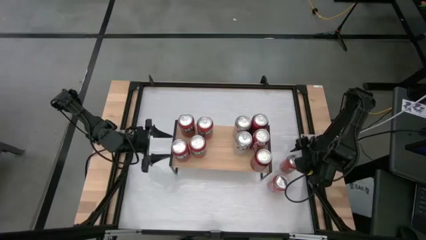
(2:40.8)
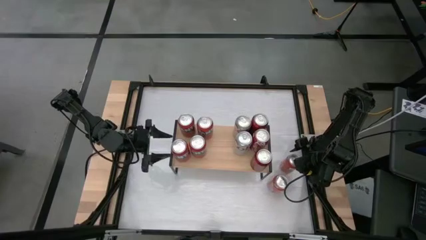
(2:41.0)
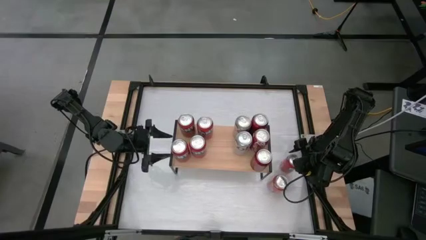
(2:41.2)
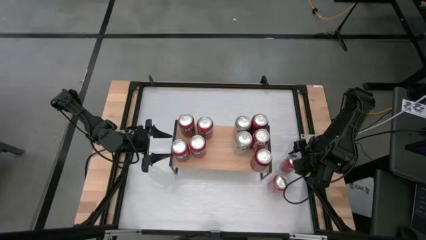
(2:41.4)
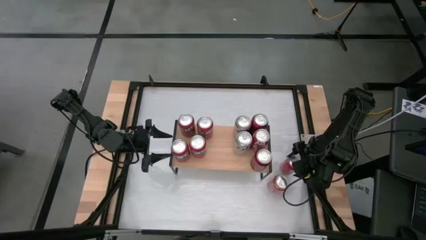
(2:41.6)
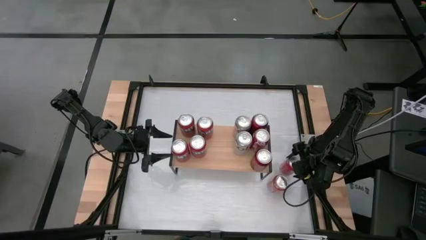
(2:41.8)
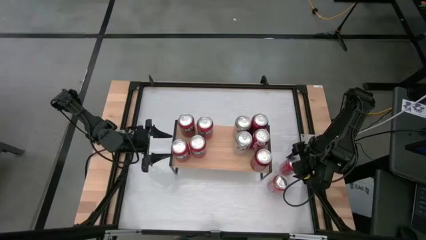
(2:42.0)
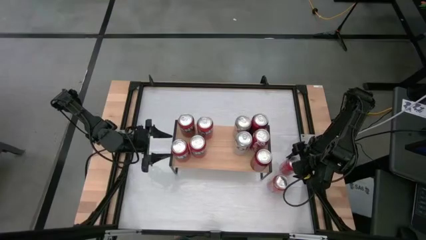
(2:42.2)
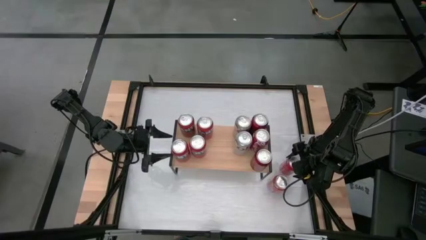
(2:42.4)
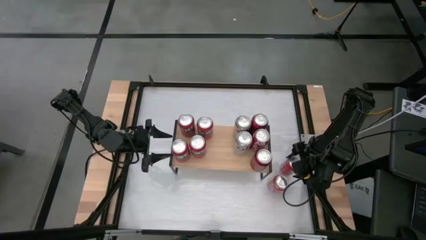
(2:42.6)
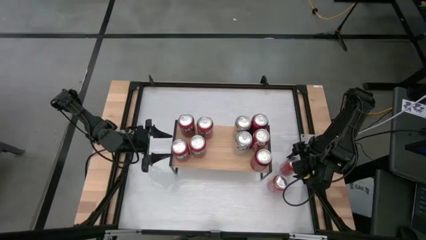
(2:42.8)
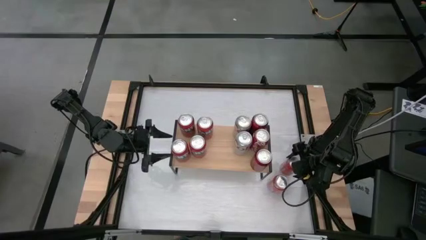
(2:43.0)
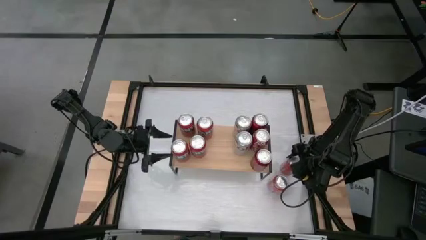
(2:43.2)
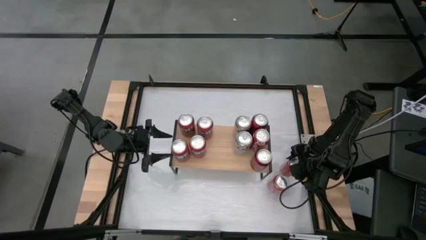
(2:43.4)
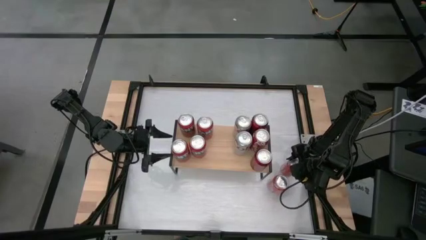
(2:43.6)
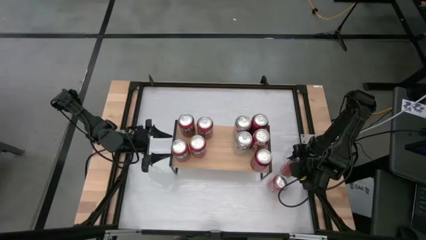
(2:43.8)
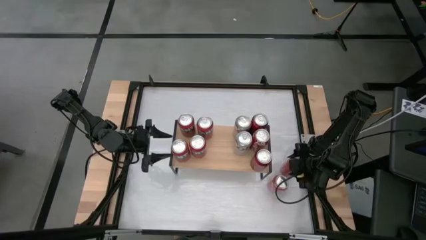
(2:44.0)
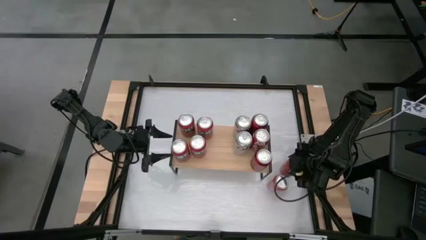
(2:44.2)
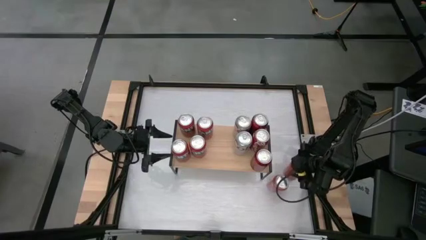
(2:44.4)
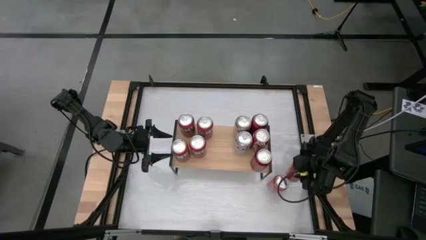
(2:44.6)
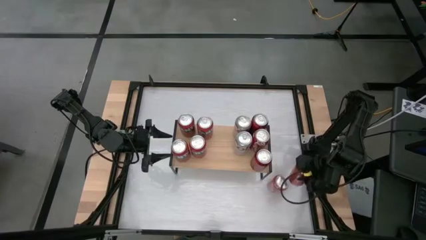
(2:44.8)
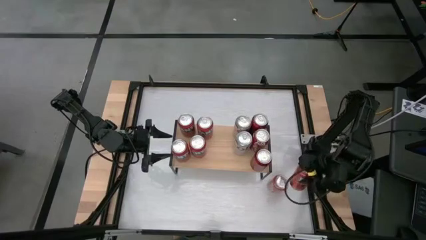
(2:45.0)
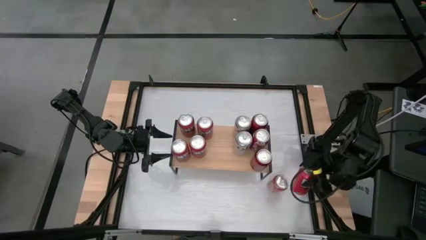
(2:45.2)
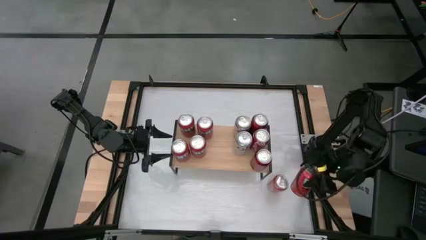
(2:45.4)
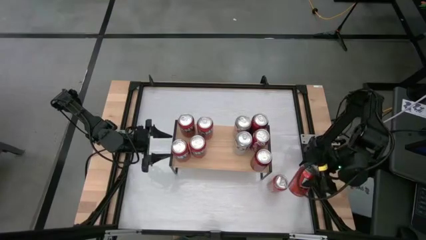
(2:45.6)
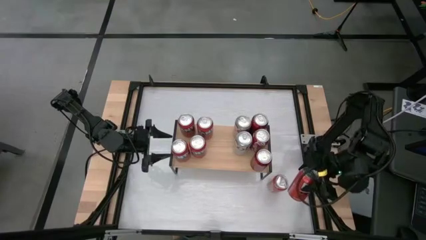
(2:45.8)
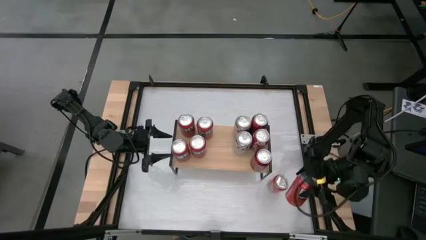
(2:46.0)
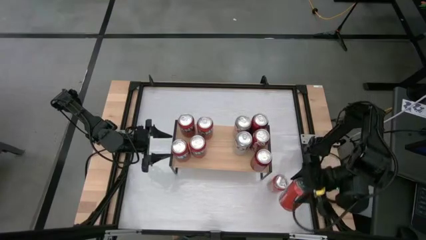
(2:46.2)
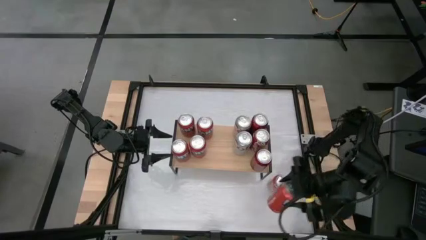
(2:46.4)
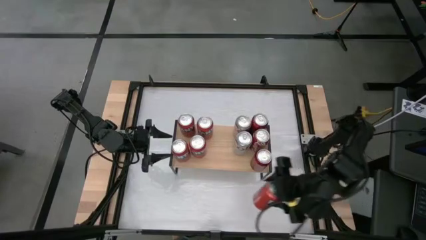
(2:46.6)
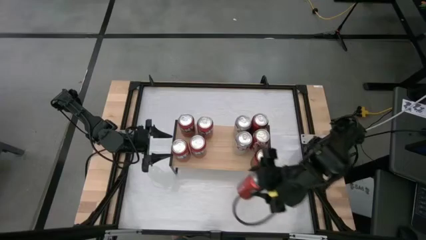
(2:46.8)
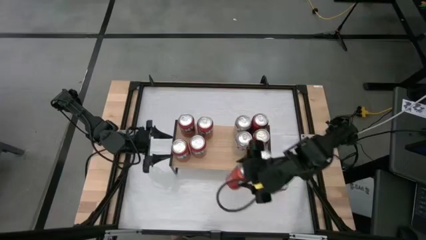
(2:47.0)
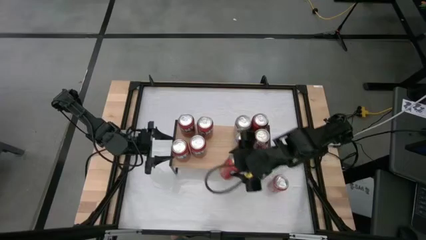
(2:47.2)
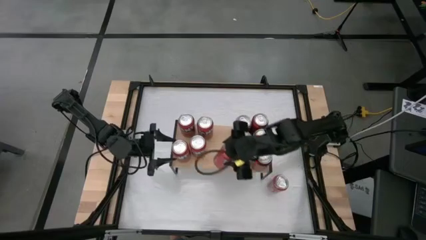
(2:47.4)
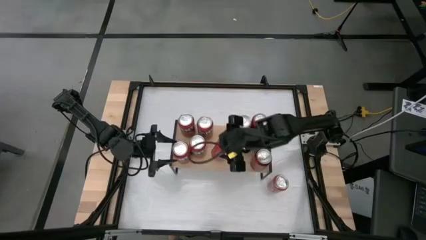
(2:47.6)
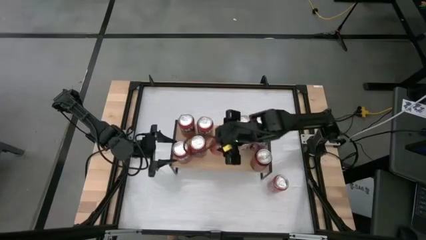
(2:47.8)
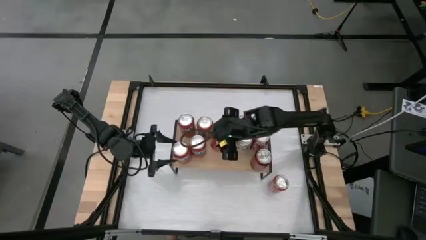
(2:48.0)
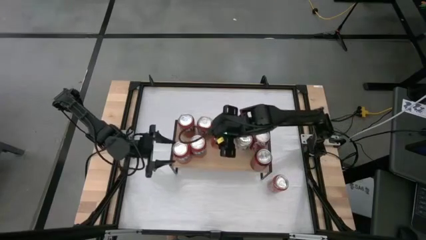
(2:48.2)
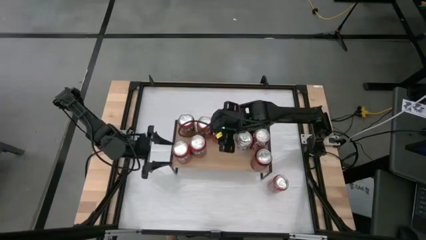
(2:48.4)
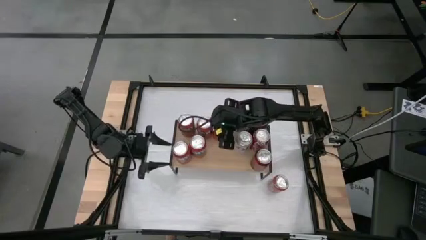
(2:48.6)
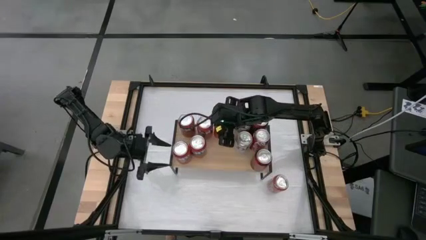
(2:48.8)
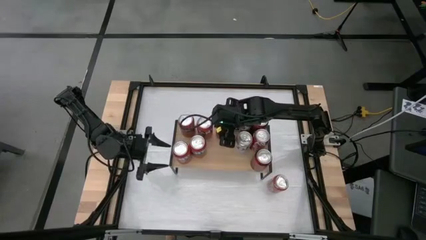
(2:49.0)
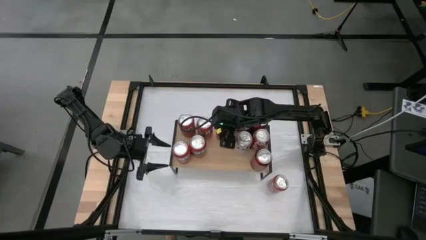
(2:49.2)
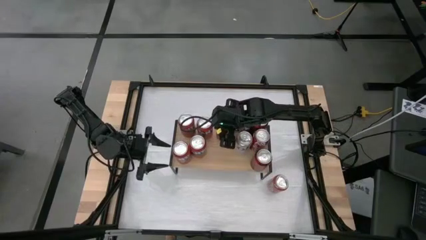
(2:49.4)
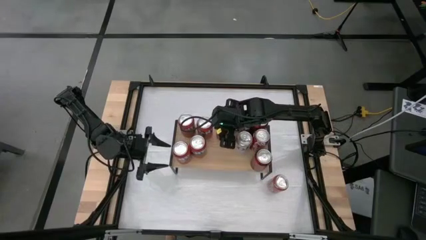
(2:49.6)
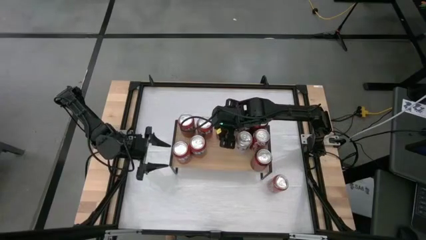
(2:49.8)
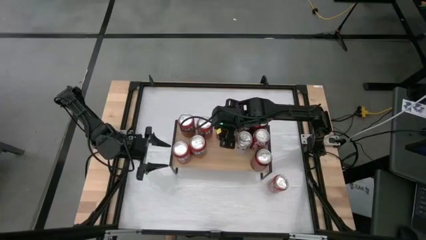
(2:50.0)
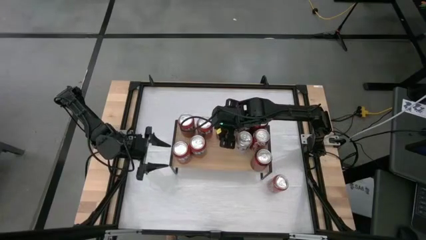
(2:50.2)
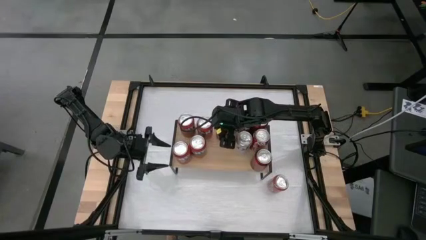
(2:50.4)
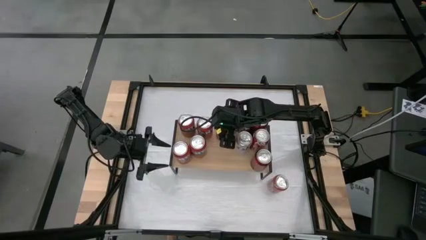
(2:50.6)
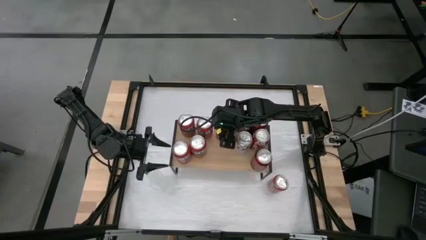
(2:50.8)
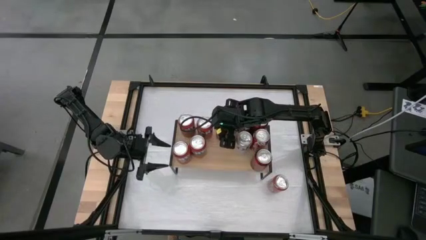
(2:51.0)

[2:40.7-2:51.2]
Task: Place canned beverage on shelf
Put the red soda can on the shelf

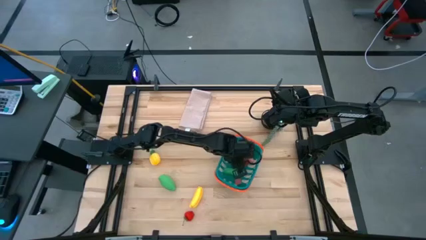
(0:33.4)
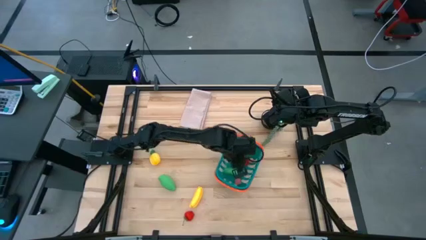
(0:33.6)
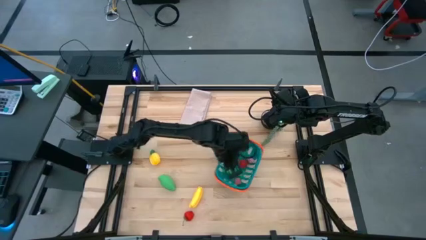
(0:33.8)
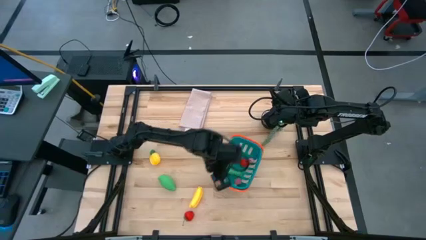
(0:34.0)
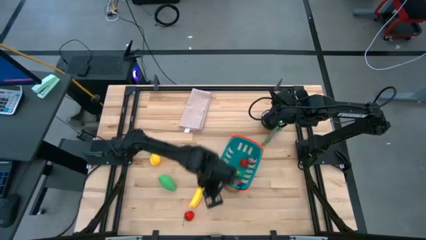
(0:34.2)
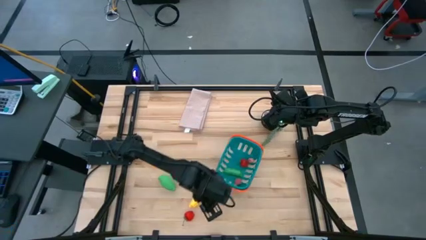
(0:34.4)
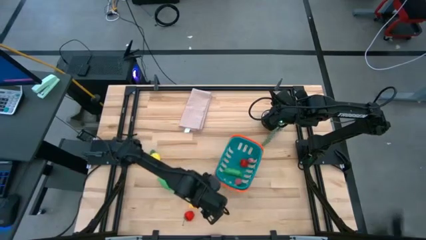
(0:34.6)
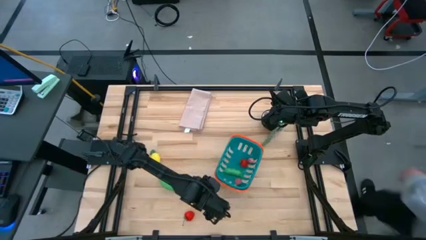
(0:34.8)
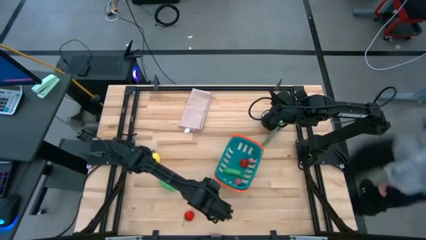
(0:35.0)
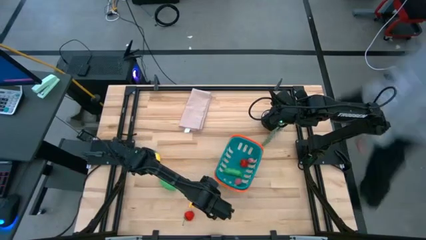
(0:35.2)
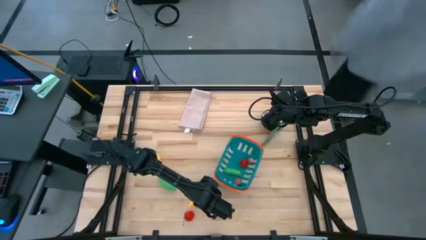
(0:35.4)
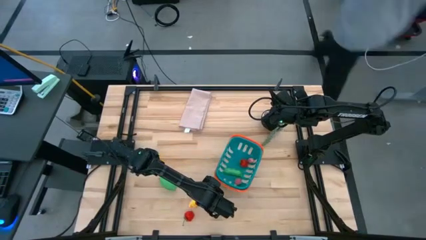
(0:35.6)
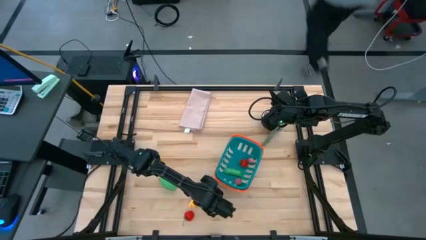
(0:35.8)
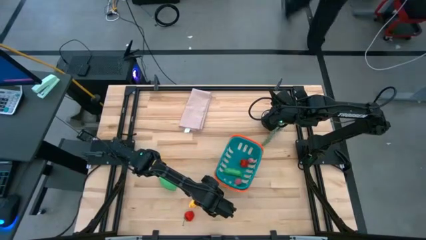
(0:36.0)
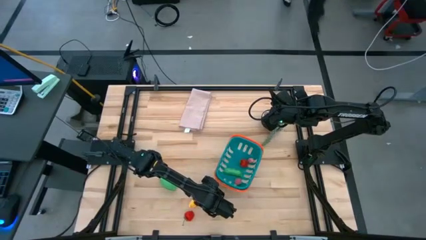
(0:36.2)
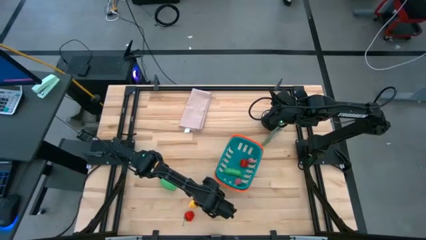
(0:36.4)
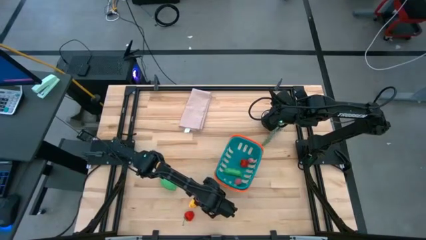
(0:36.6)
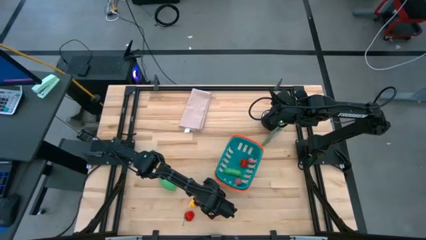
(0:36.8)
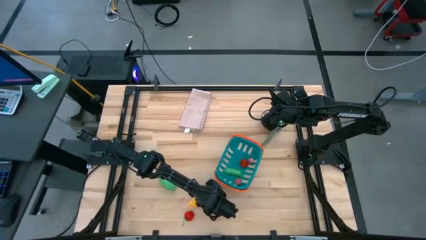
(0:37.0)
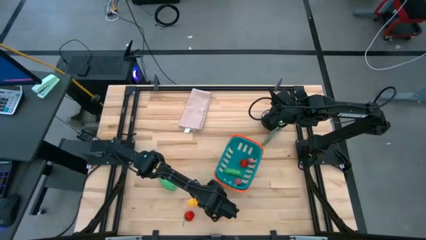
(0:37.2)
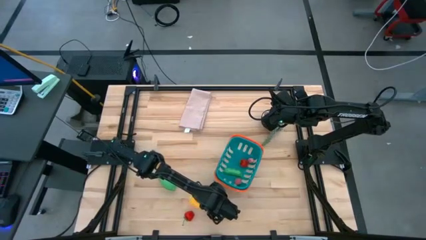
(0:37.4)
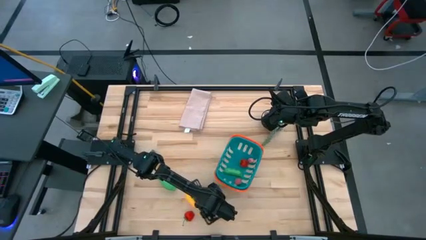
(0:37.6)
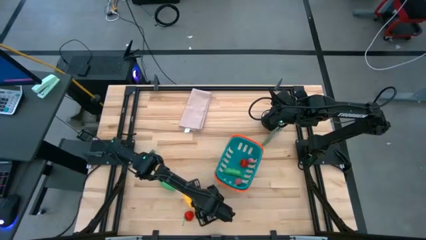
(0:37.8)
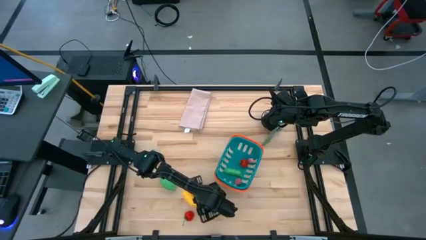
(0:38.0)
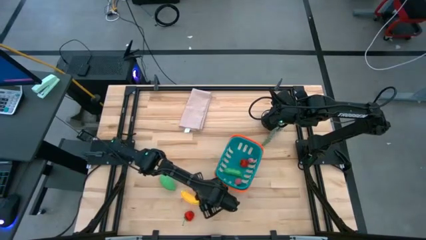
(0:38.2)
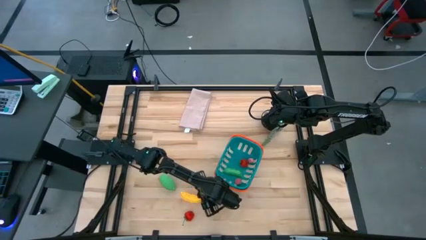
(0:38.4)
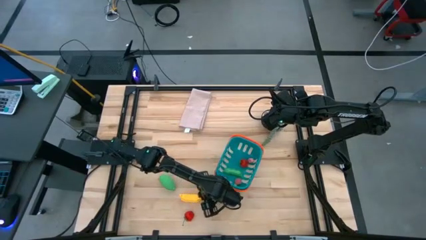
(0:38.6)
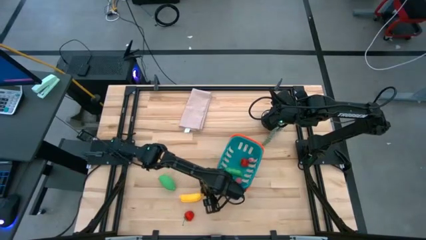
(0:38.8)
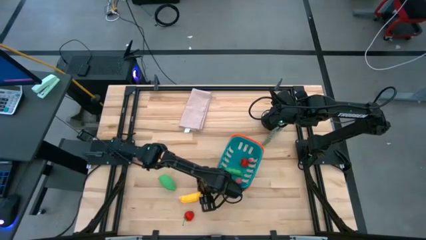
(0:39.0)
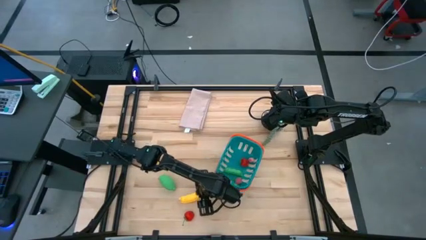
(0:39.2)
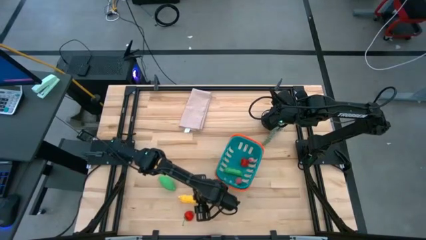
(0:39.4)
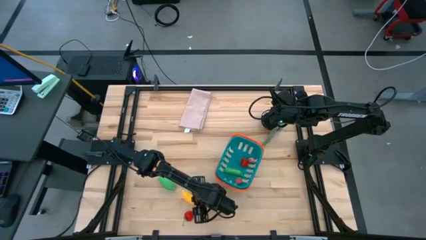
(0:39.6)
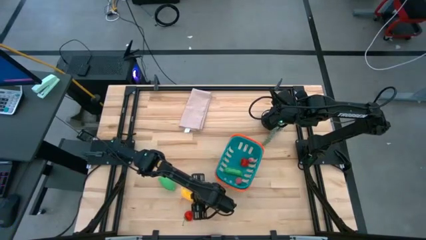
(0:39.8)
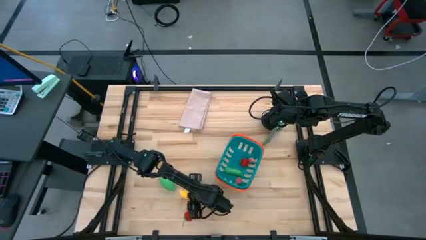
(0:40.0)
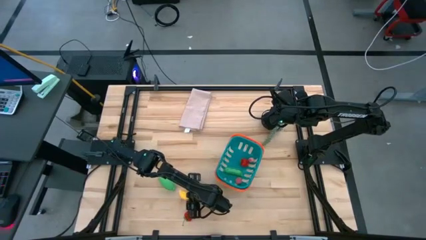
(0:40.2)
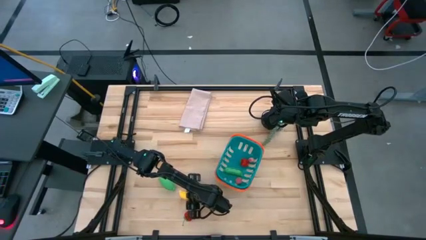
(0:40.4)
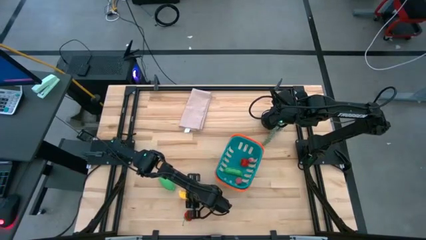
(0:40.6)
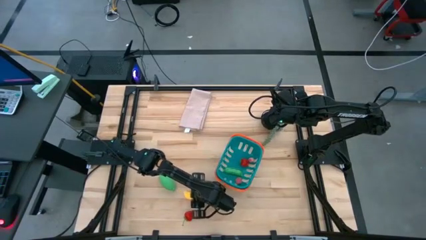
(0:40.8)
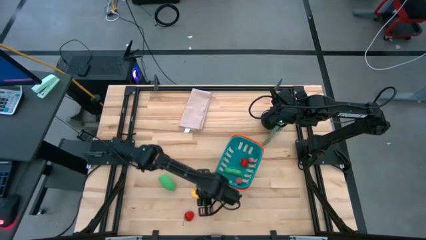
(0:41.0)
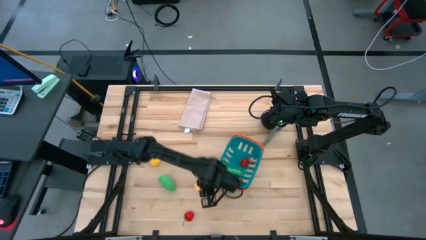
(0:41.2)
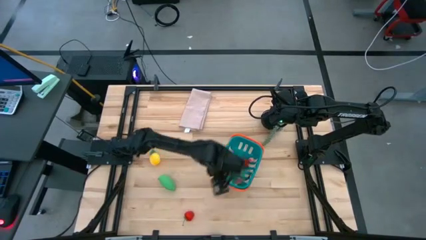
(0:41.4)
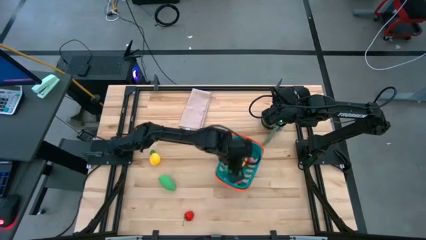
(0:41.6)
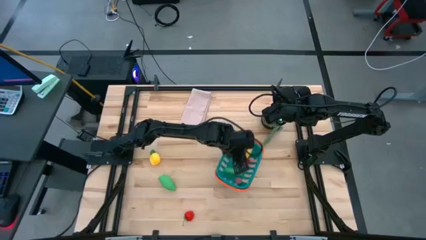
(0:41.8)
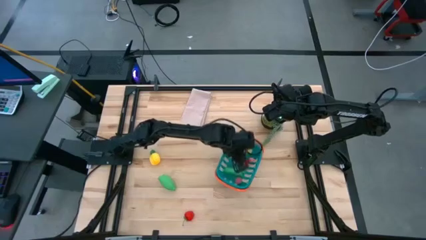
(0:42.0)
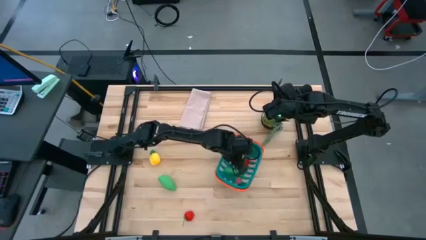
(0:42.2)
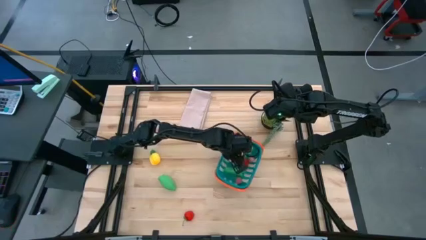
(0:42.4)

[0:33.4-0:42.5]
Task: Pick and placing Produce into tupperware
Put the yellow banana into the blue basket
